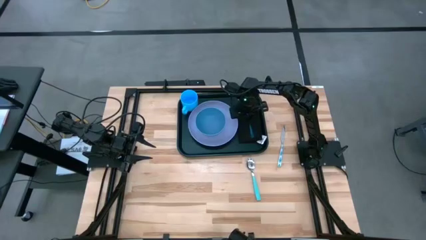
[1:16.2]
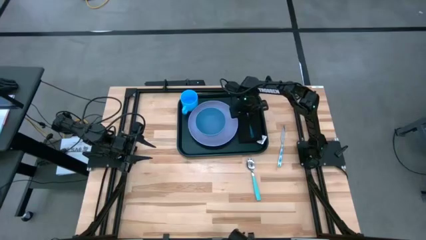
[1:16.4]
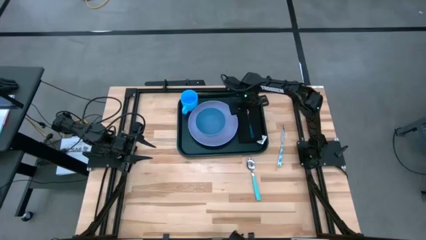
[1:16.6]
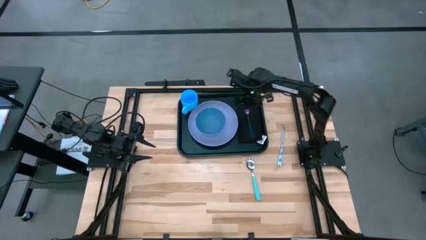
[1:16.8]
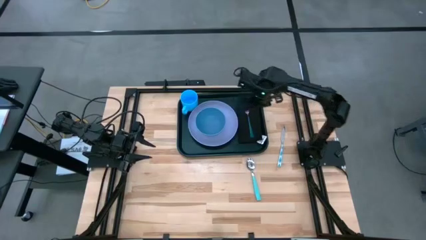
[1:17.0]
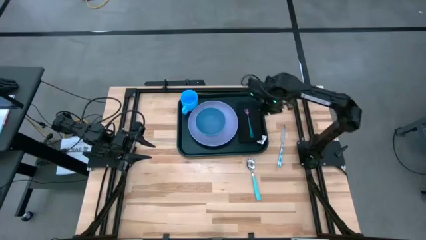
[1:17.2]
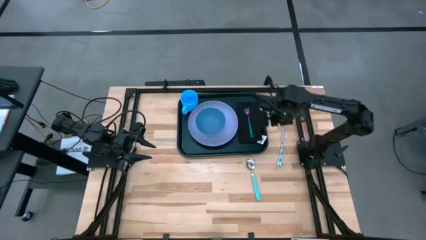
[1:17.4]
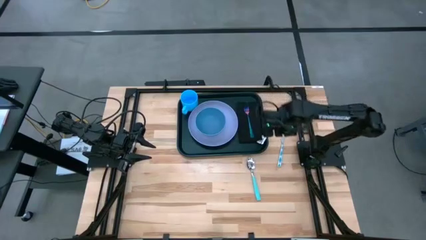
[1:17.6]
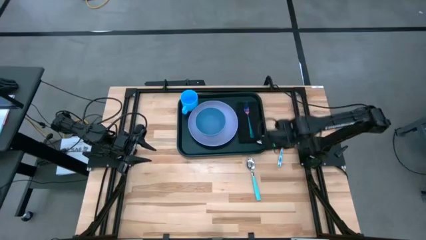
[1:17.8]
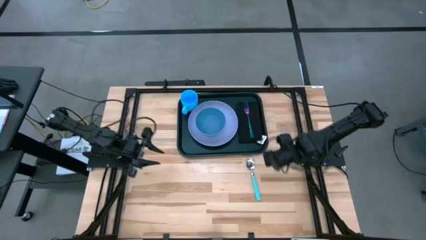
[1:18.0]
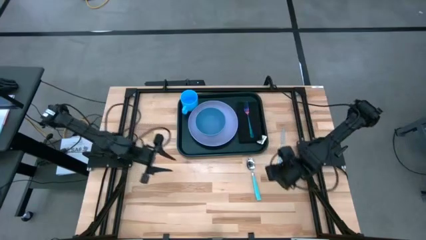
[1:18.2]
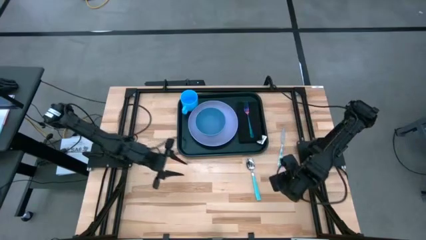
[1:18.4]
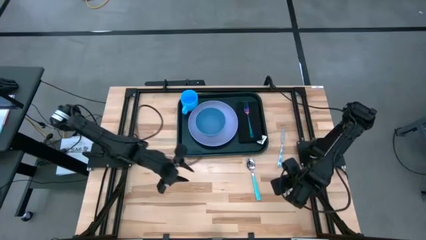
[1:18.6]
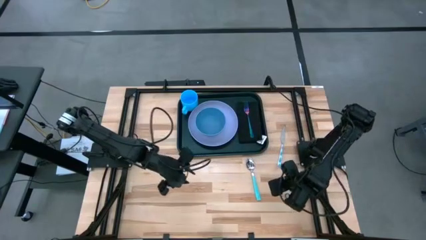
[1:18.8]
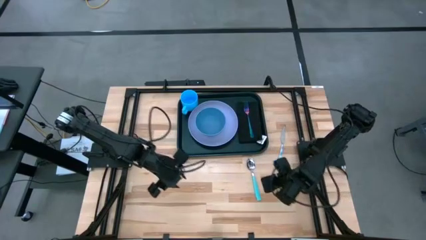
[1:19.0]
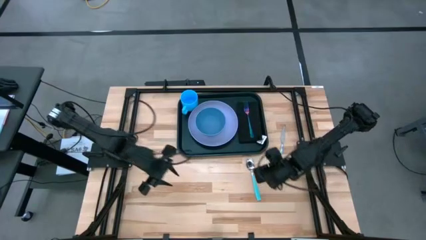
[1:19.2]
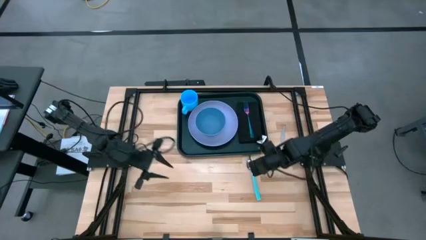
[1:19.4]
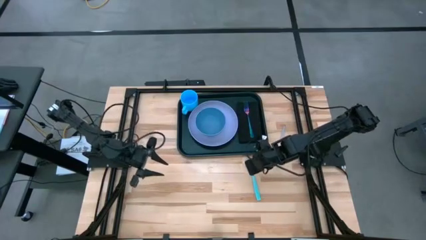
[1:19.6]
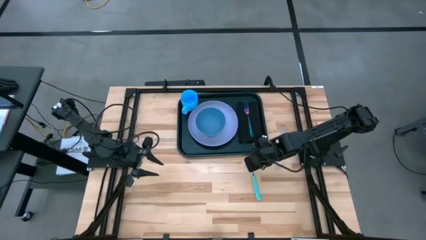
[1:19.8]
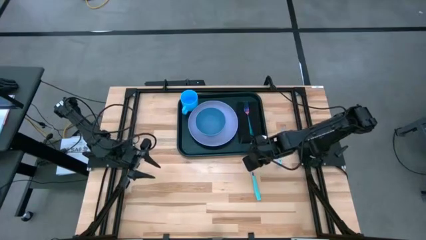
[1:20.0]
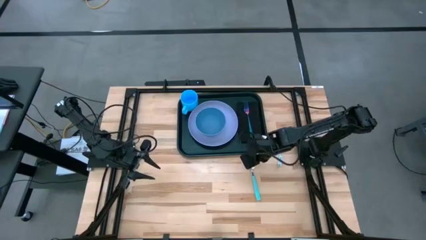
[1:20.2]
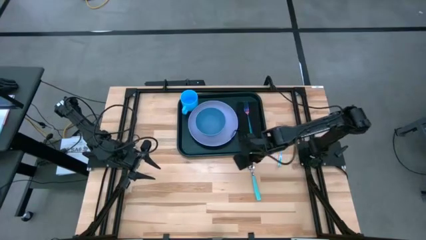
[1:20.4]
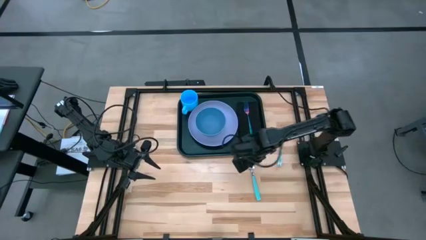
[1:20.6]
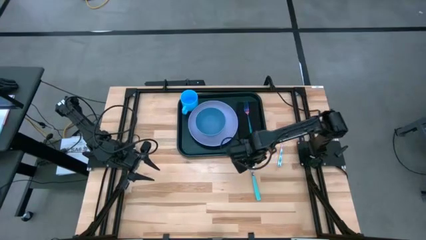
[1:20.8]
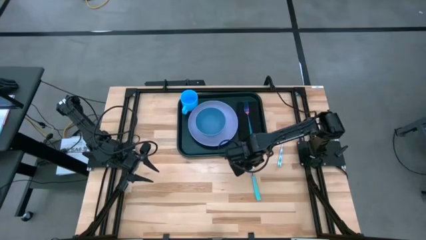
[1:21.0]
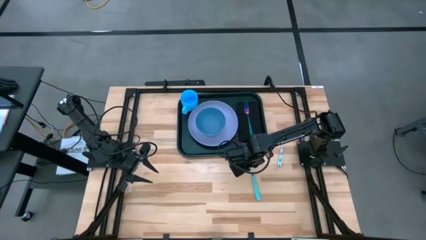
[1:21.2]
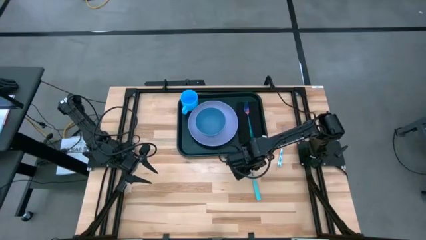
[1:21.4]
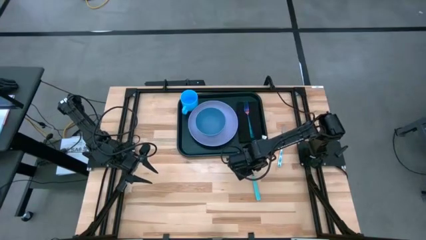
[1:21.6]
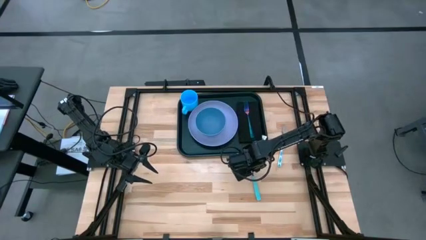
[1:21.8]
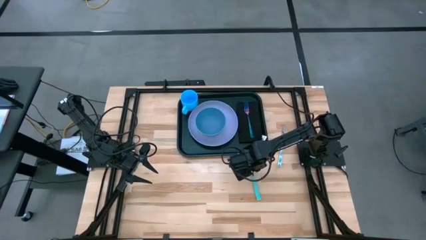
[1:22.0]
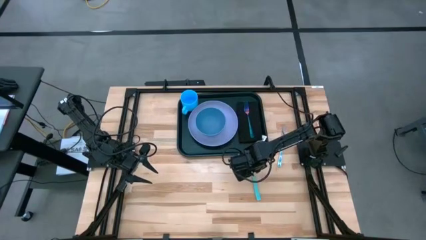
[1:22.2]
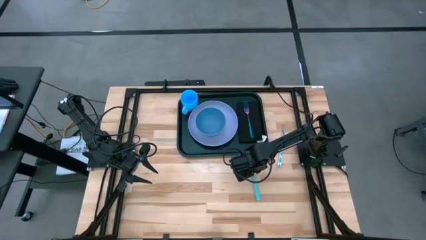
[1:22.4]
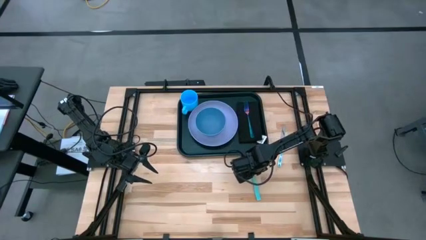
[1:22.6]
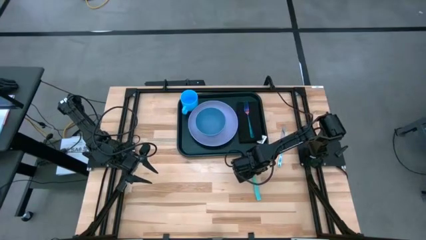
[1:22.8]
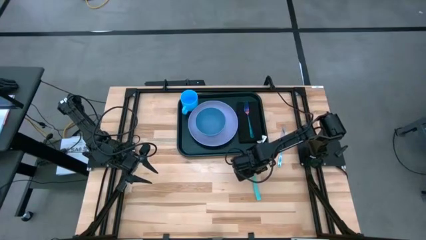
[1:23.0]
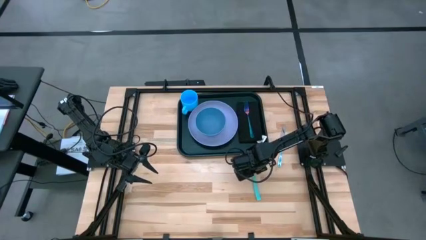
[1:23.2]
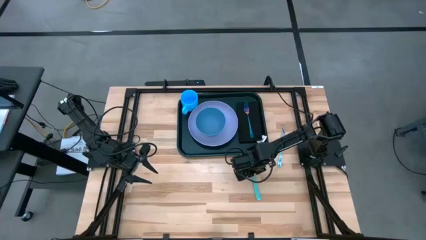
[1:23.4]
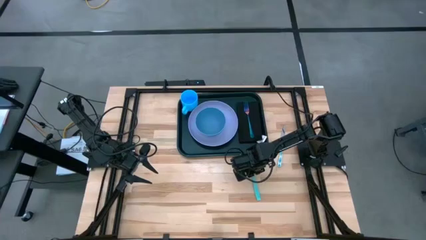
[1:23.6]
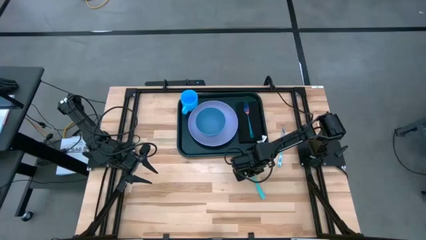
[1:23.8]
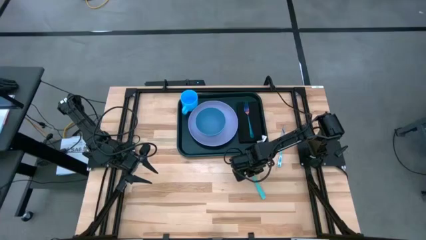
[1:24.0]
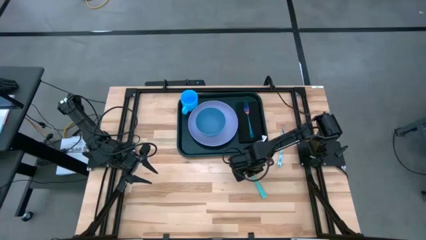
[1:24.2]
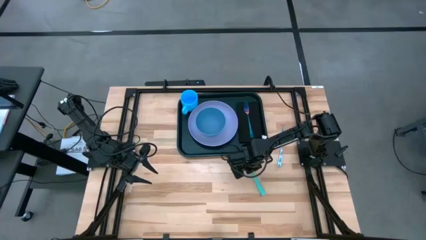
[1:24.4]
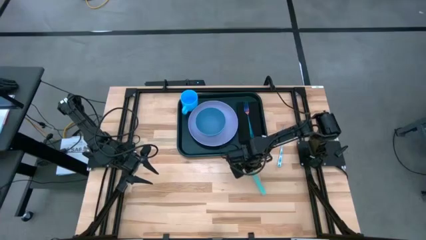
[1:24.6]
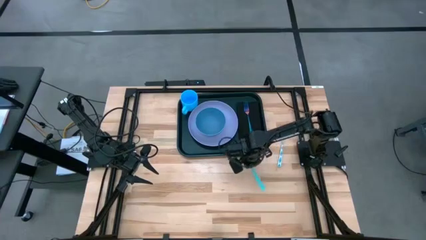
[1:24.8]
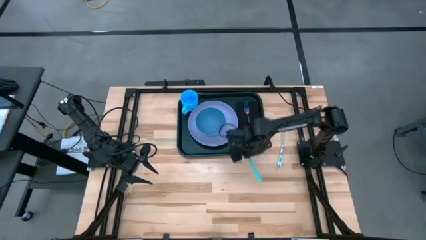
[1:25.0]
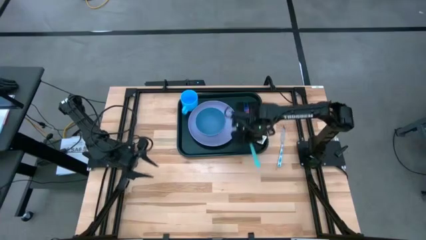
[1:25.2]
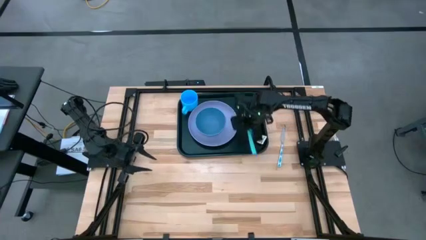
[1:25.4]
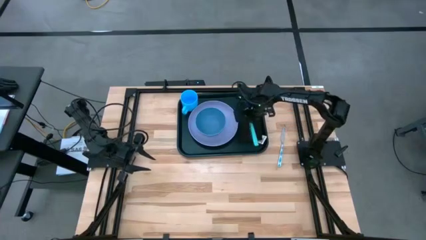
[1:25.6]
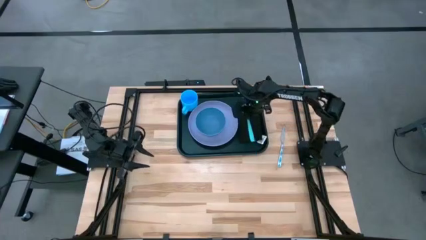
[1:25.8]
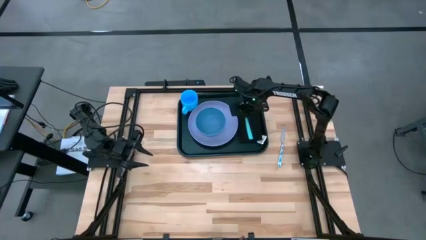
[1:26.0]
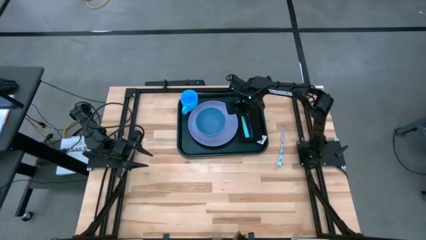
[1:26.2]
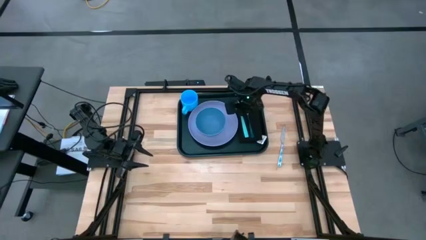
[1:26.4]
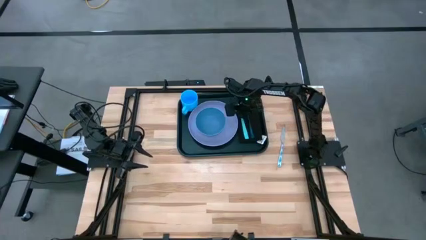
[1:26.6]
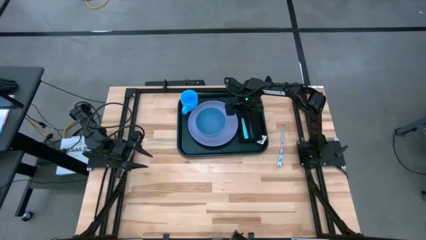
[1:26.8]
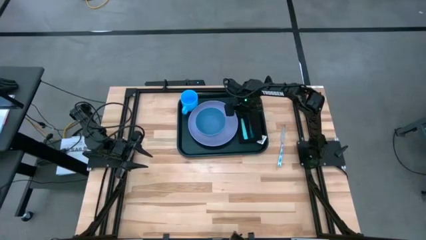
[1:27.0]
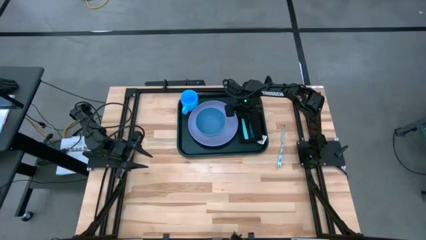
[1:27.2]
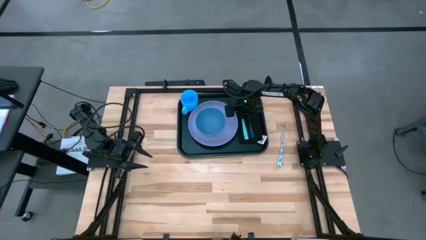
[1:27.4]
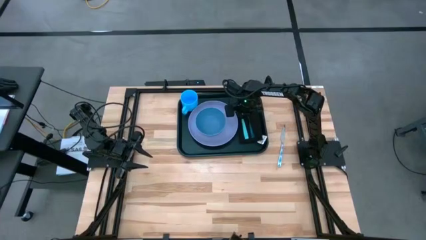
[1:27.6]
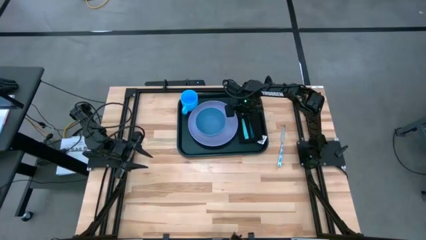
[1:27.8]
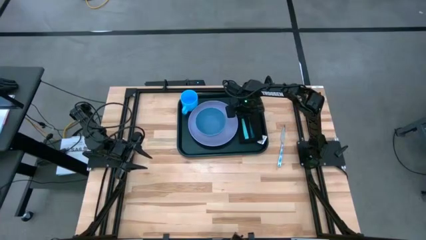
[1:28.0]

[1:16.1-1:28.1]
Task: Set up tray
Put the blue spoon to the left of the purple fork on the black table napkin

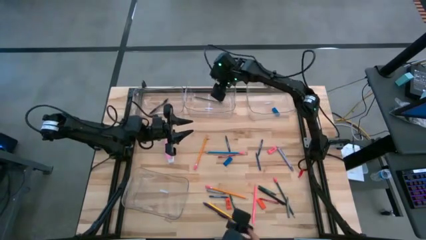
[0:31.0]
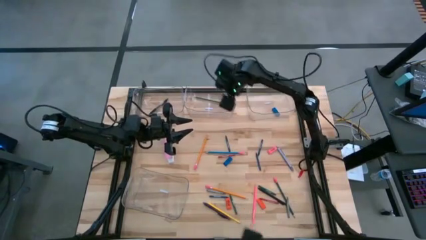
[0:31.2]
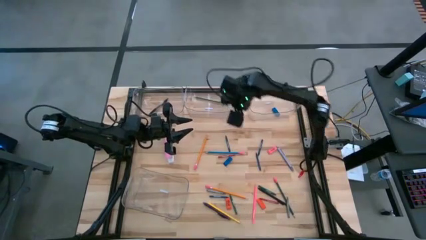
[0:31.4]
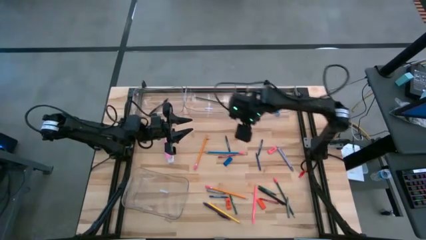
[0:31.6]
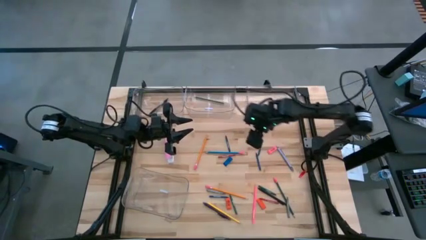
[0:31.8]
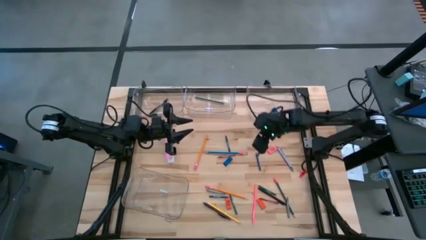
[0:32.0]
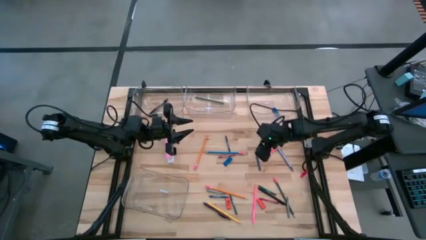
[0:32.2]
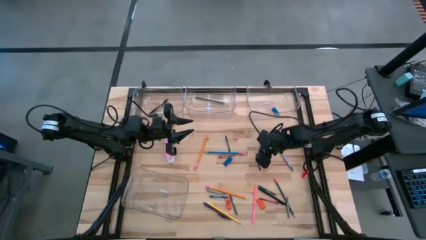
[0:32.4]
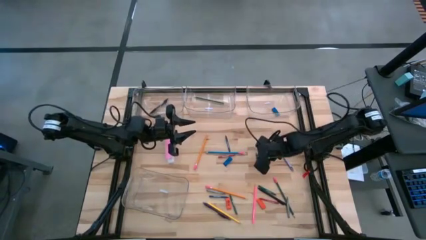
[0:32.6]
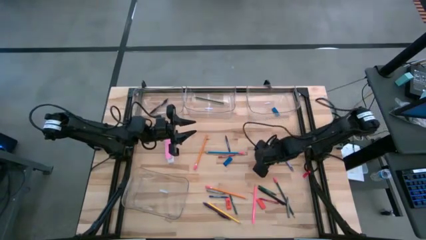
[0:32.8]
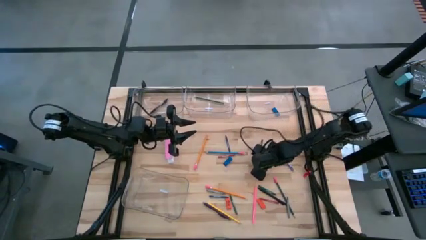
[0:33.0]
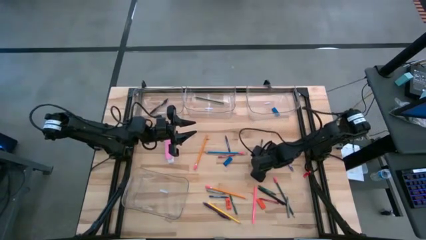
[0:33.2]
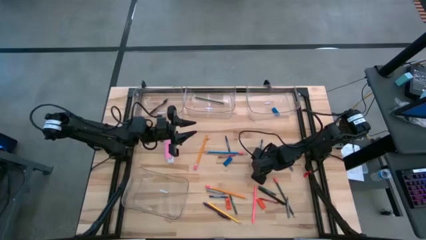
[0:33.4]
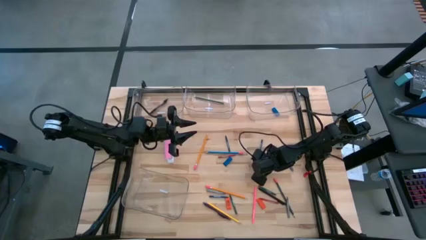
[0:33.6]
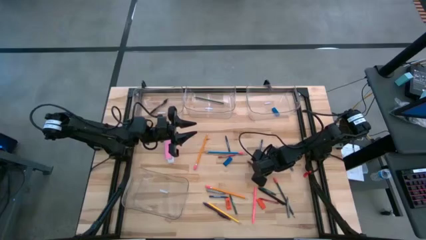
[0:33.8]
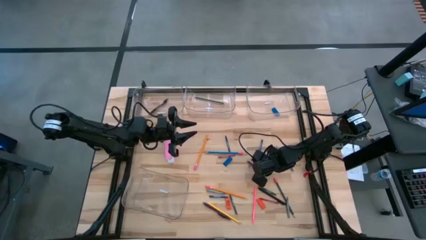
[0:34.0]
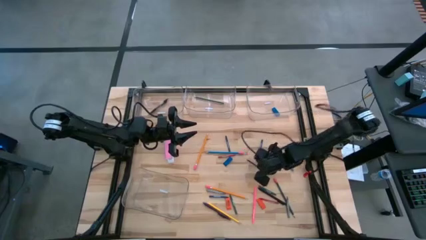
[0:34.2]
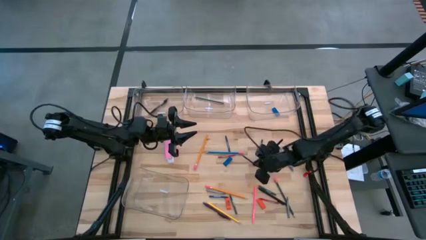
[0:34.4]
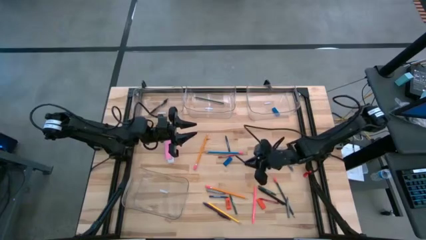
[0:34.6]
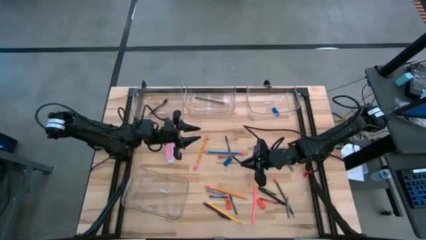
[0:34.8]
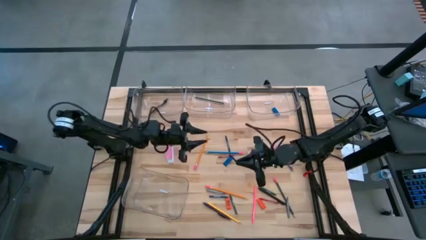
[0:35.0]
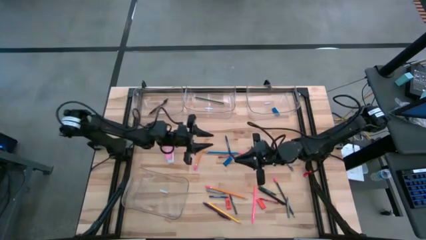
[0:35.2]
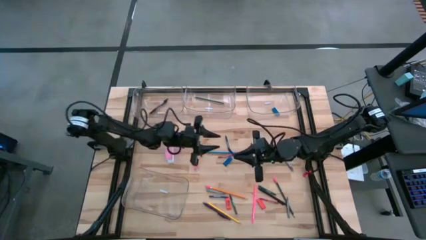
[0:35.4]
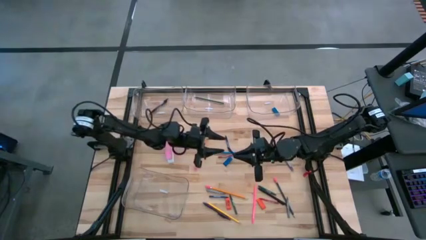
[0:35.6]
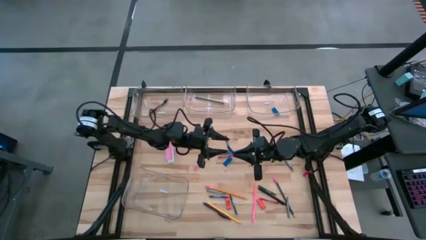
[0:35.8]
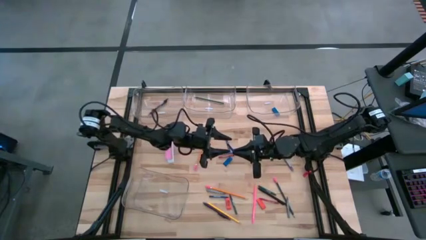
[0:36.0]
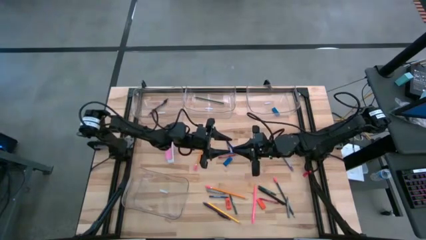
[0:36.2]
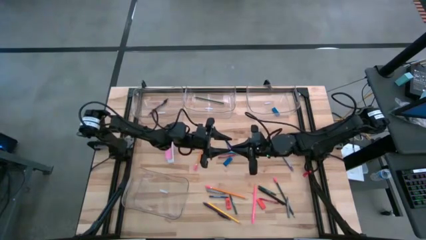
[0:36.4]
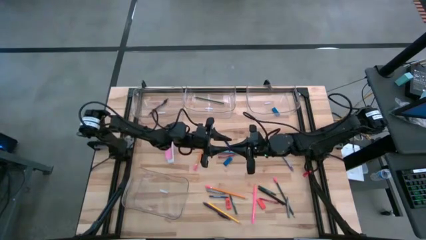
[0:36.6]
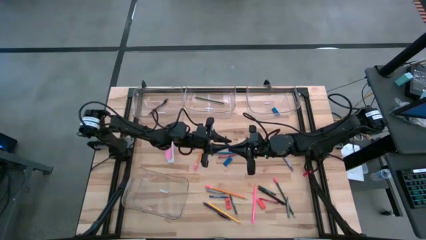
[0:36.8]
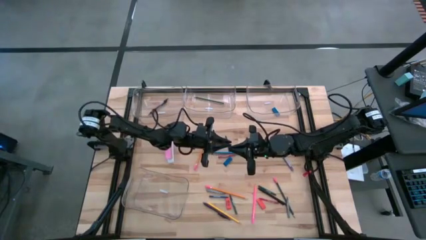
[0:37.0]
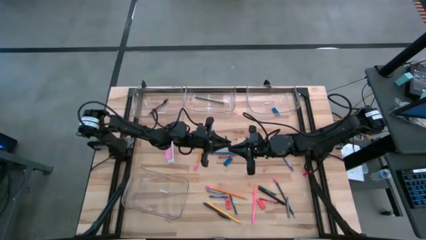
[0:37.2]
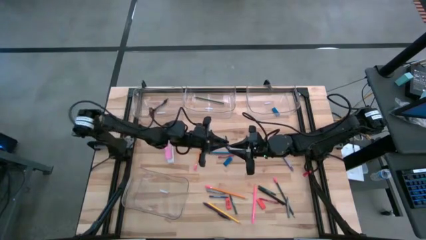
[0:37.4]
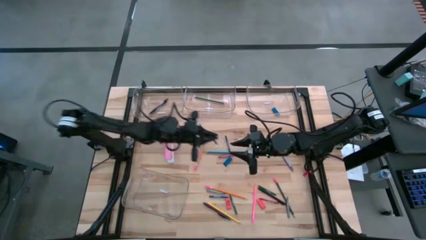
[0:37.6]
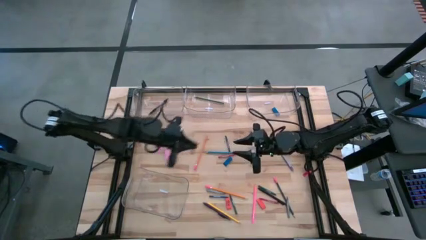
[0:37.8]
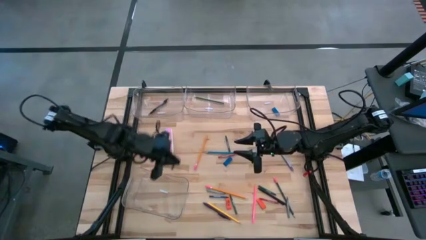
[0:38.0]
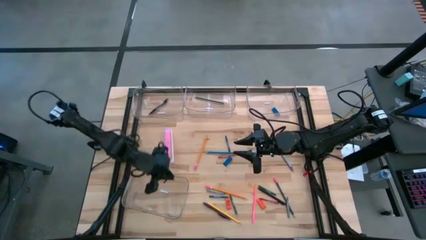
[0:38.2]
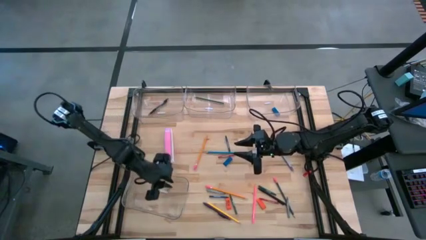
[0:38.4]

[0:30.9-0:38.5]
Task: Sort crayons/erasers/pens/pencils in bins
Put the blue crayon into the bottom left transparent bin
